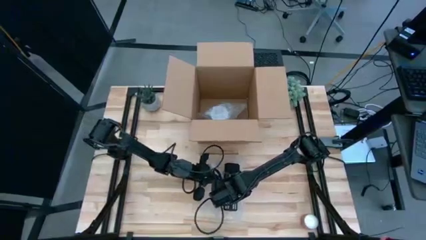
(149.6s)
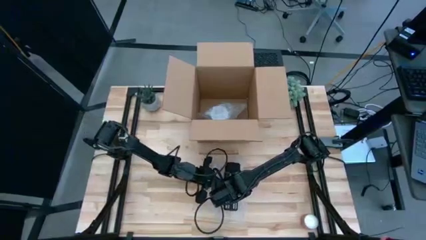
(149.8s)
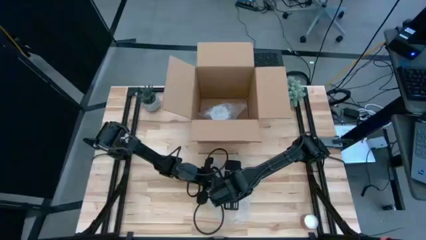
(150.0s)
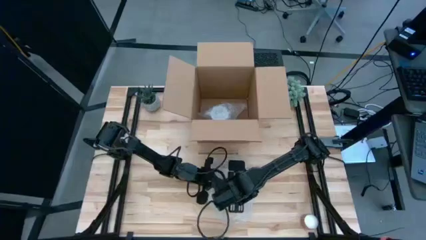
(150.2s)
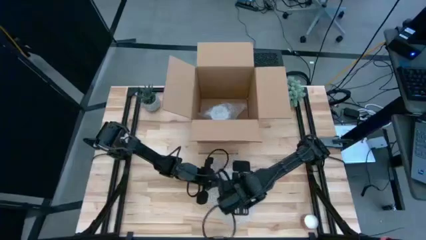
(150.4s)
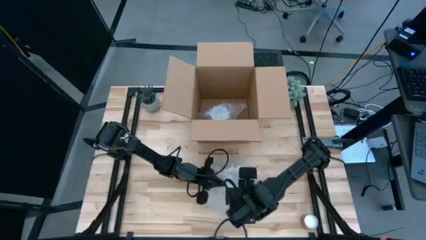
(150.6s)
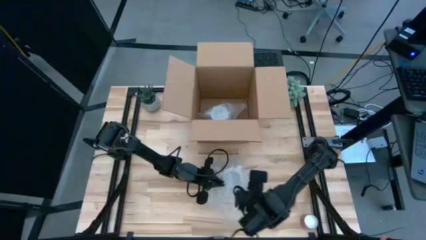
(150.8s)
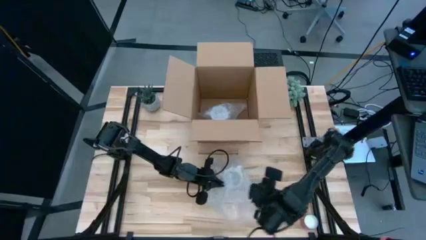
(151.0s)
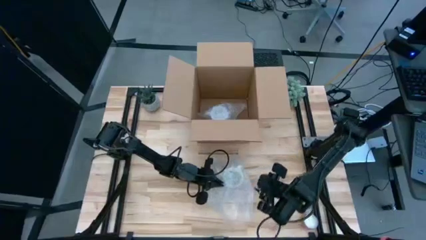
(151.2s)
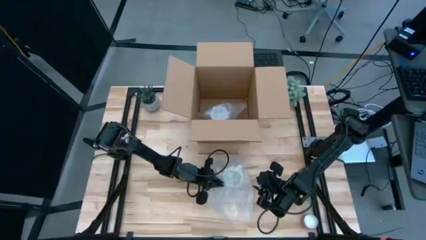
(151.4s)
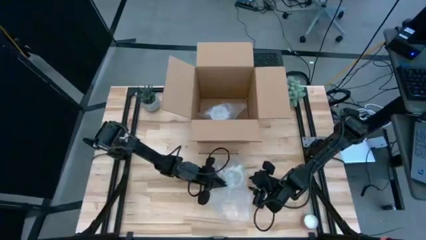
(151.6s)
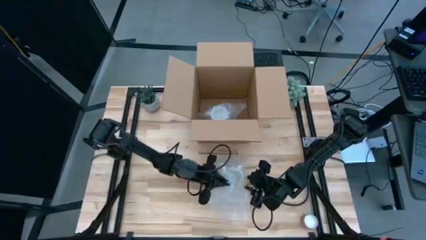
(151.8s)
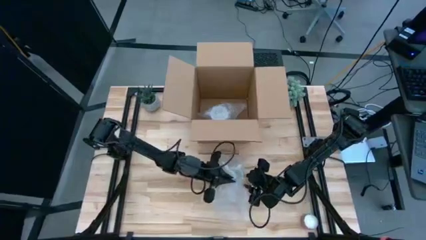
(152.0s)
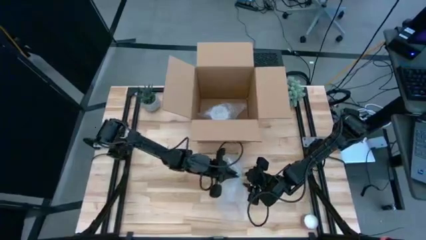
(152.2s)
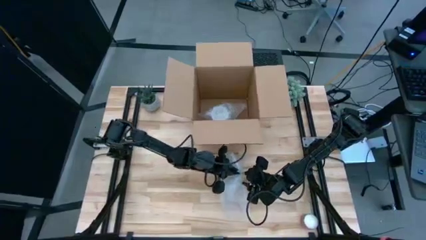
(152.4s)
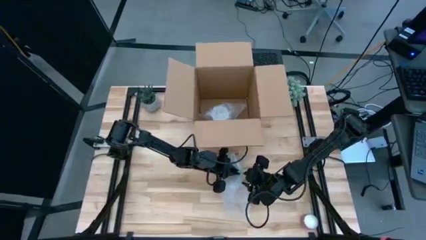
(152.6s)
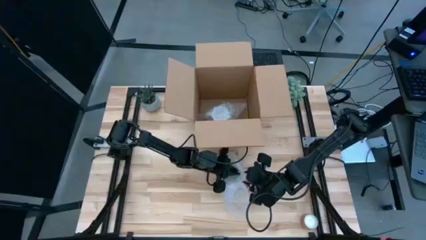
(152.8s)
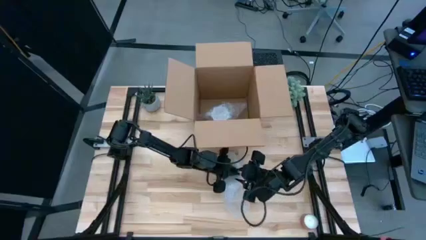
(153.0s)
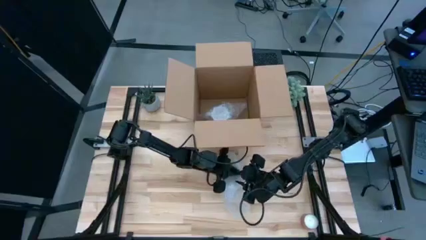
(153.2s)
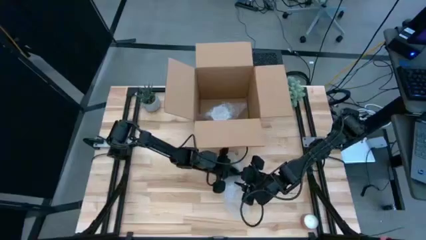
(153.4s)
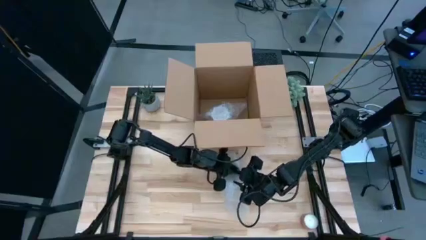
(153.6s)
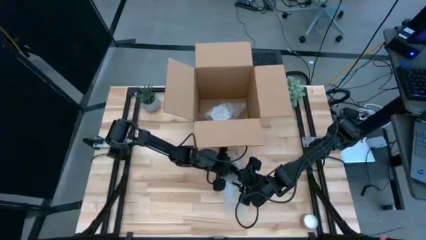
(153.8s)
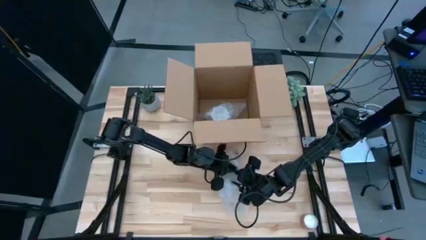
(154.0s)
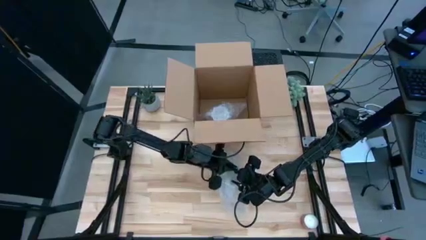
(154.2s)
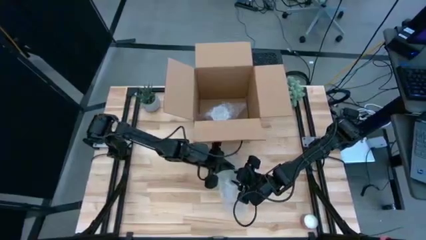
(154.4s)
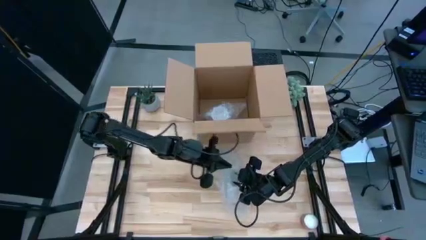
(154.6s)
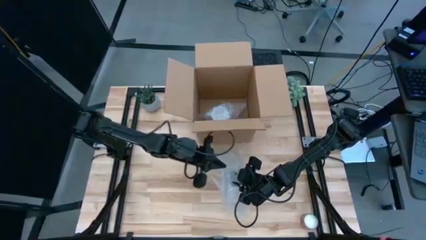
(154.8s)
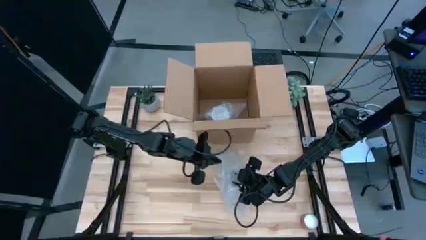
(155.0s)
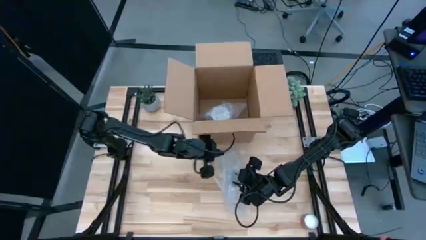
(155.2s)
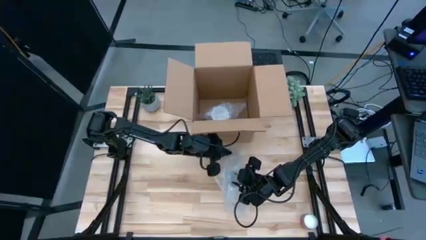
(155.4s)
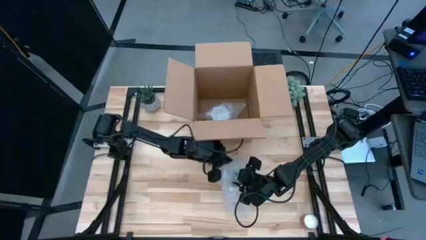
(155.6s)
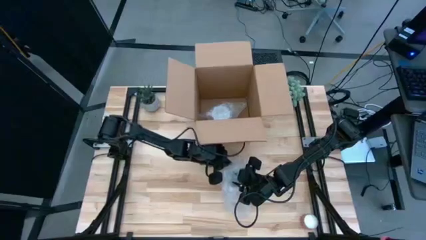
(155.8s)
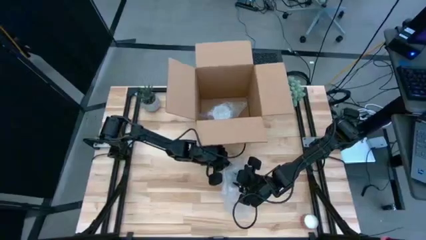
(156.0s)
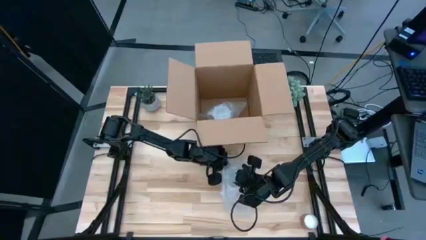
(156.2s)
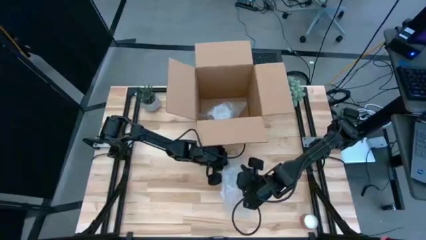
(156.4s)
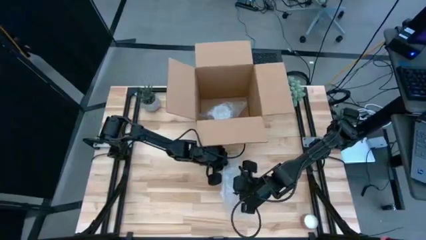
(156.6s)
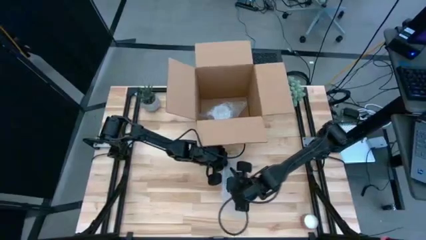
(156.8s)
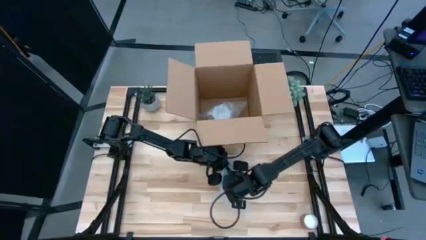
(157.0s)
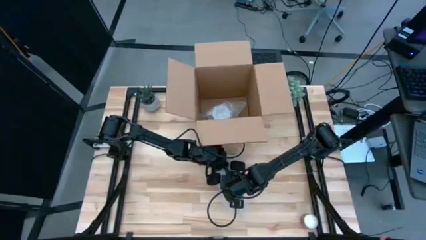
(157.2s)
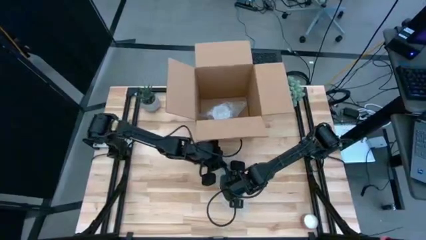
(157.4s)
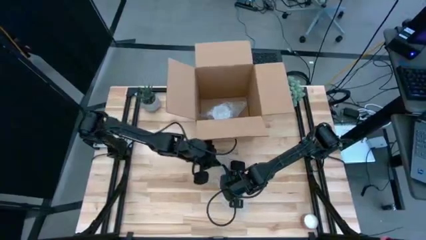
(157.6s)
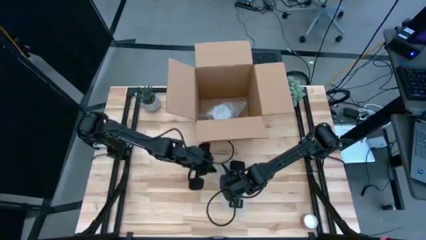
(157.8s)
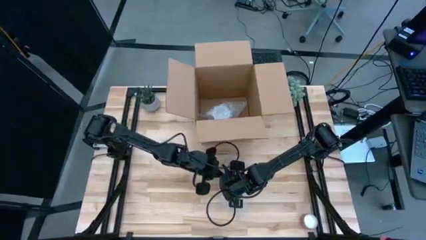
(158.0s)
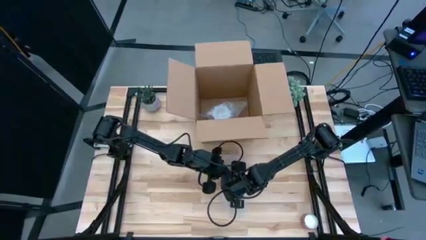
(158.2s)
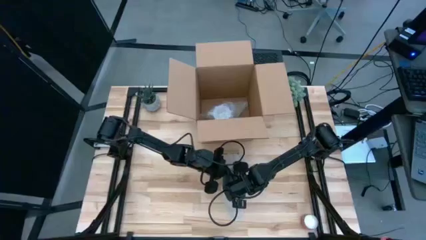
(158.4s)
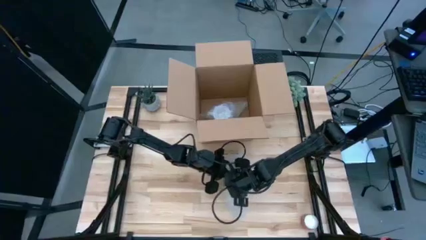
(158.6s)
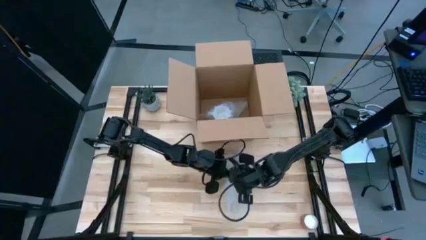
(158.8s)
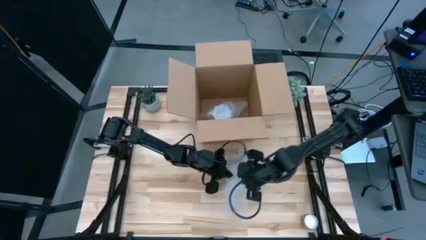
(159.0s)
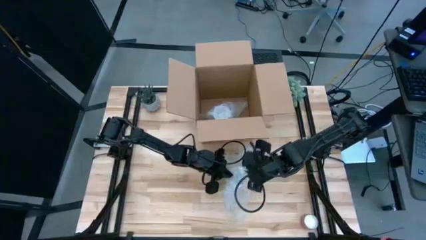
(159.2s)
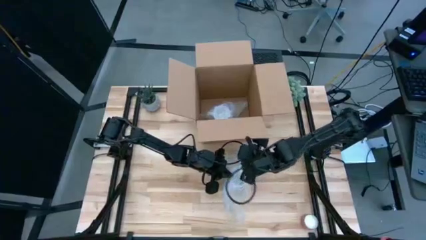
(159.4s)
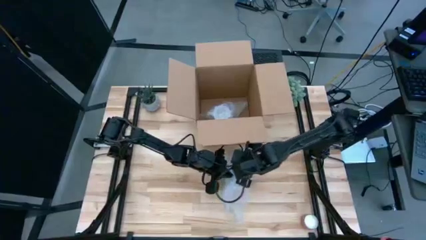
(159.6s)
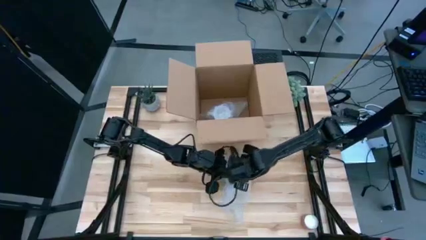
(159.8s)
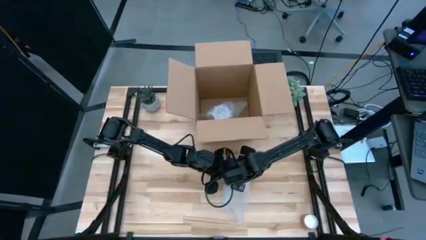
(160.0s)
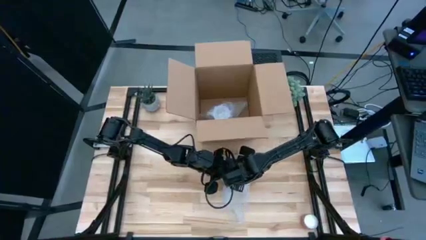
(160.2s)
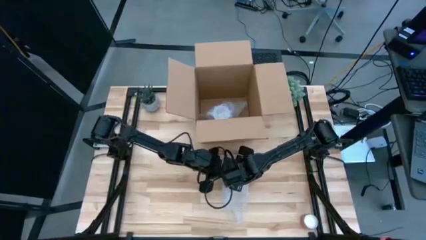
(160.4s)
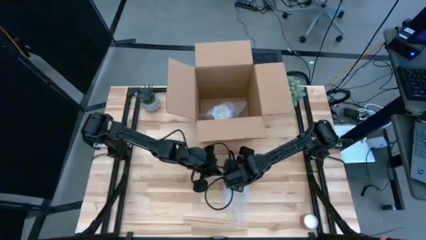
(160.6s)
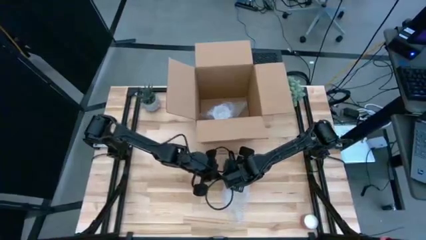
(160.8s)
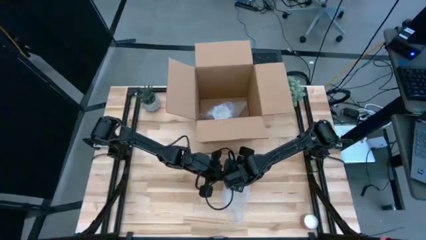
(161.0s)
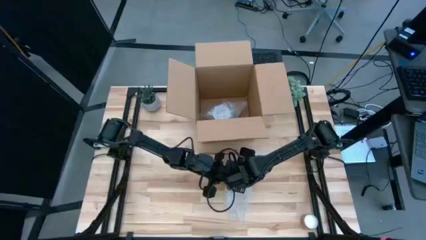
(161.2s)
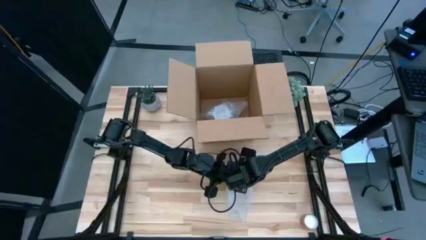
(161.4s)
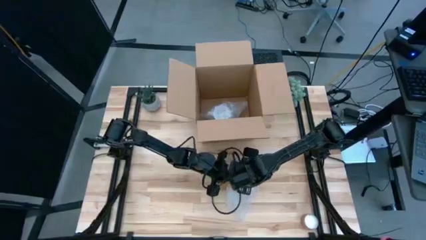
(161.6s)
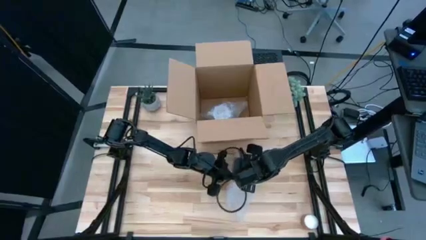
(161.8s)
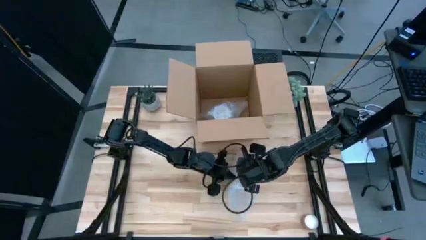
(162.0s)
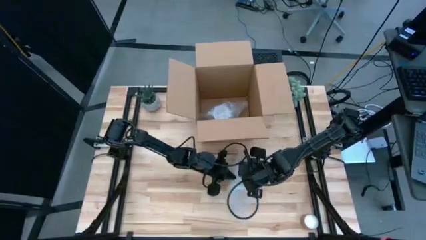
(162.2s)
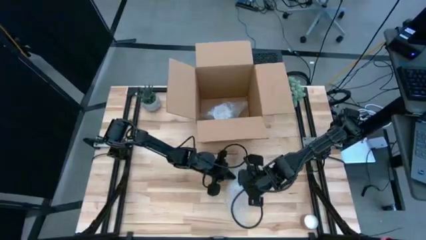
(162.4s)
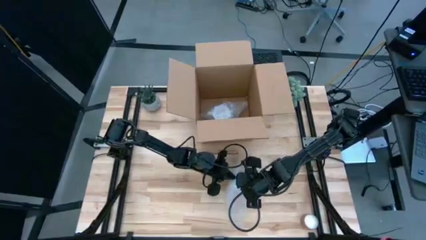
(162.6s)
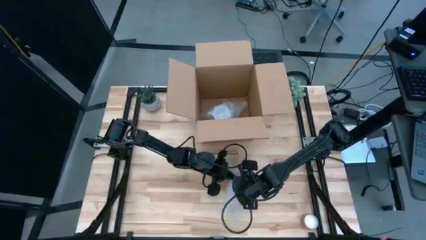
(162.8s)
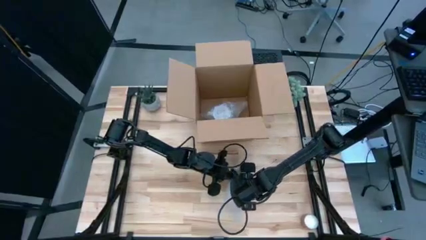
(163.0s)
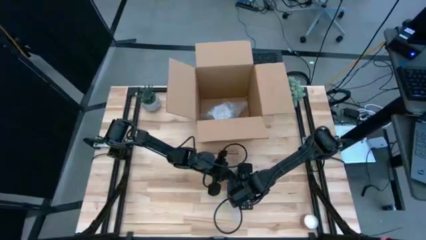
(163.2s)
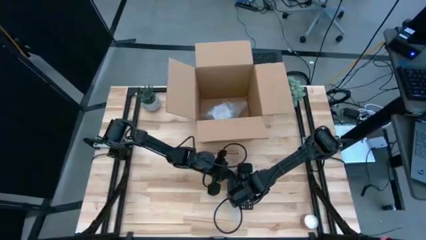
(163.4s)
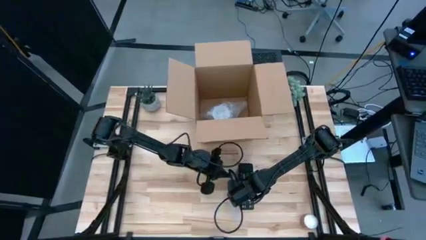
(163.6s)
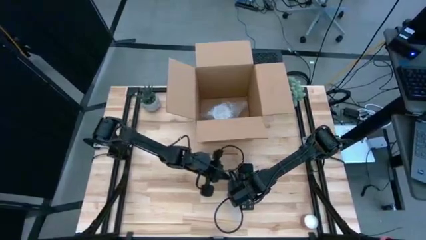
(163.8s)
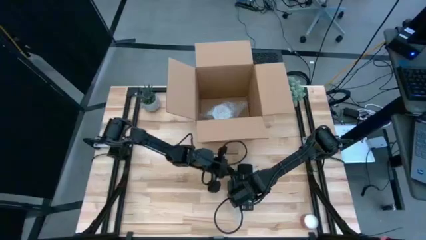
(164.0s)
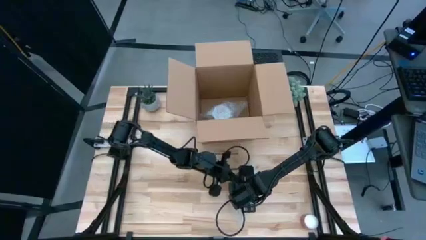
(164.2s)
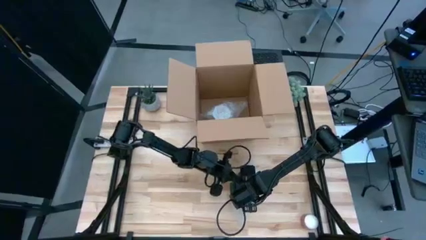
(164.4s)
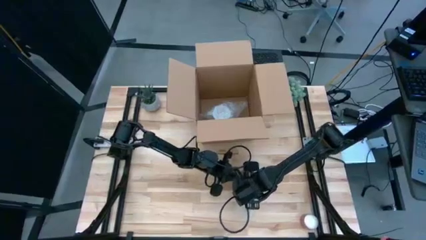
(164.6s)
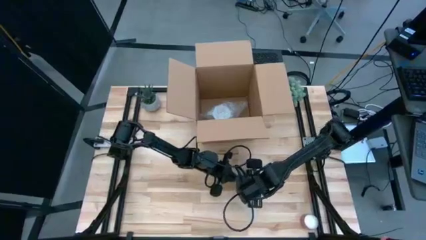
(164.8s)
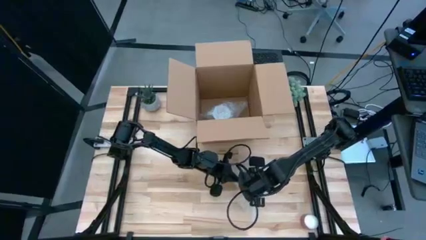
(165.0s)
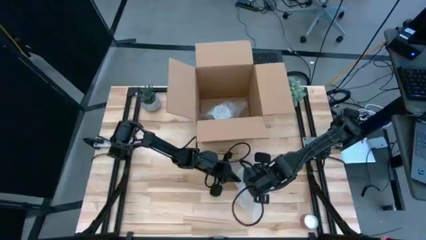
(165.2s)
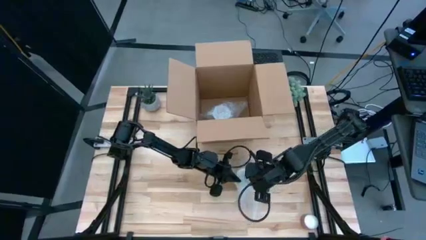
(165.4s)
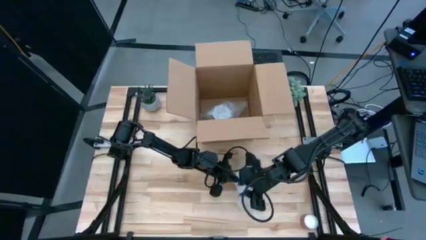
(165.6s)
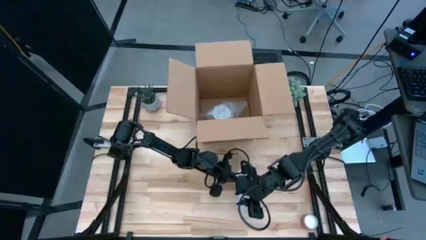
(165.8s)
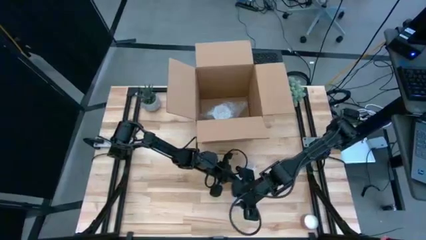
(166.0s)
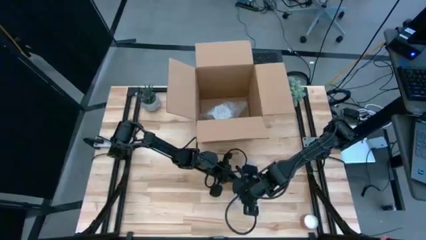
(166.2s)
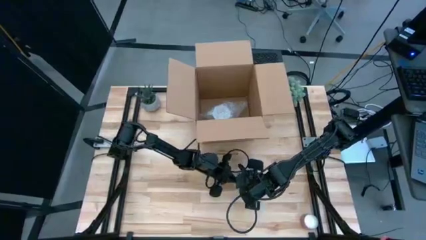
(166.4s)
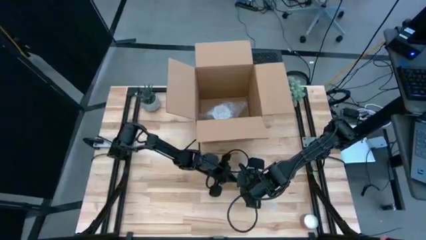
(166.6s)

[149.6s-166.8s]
Task: wrap mug
Wrap the orange mug with the bubble wrap

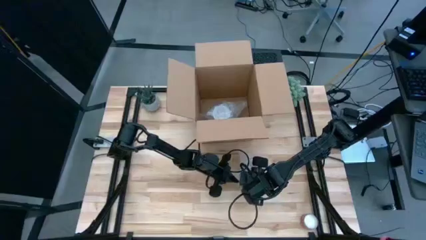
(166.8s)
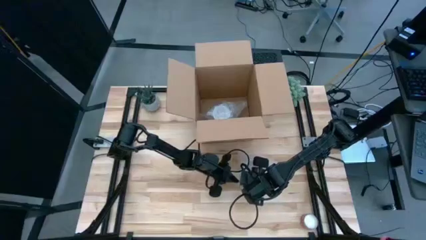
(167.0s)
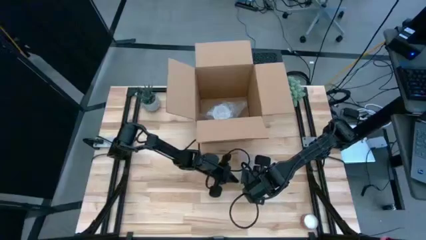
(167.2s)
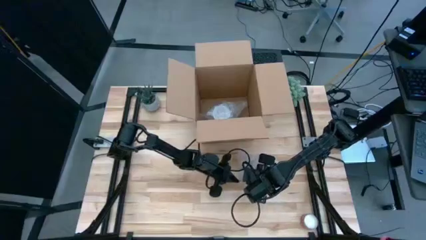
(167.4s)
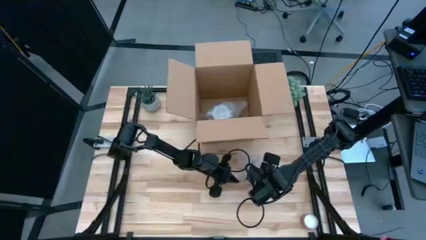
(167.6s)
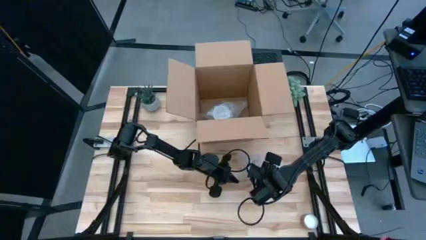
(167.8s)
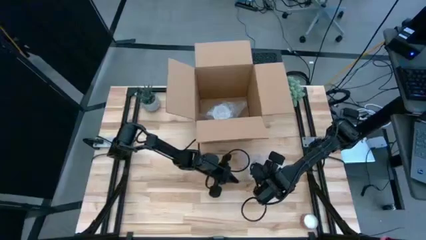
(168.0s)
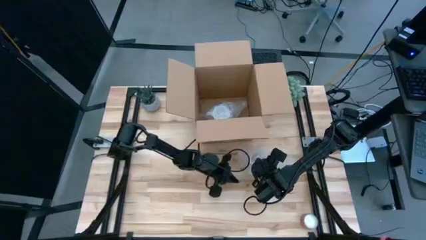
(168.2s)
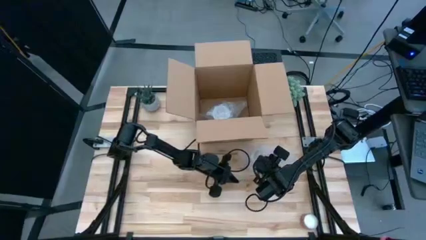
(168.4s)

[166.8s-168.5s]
Wrap the orange mug with the bubble wrap
